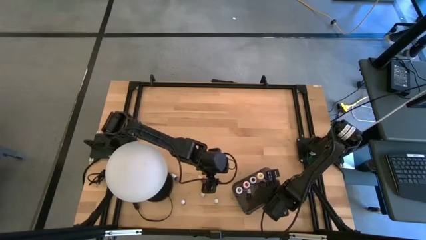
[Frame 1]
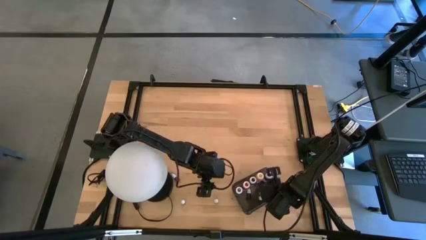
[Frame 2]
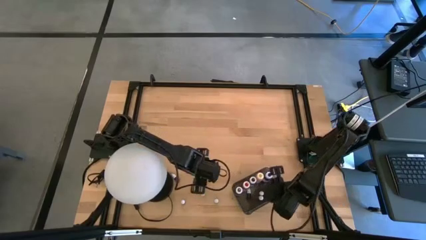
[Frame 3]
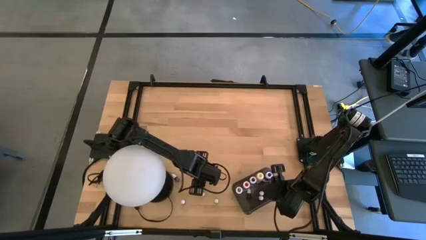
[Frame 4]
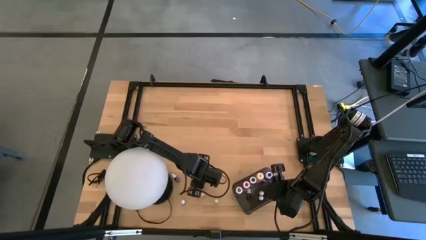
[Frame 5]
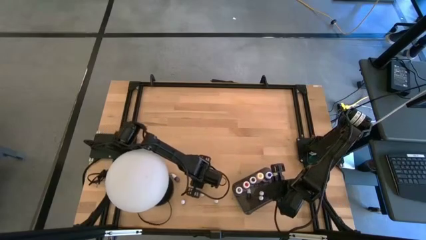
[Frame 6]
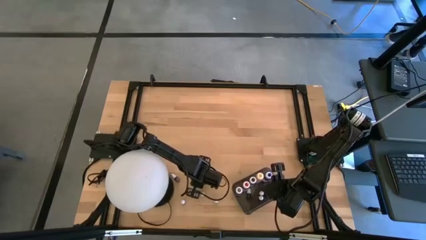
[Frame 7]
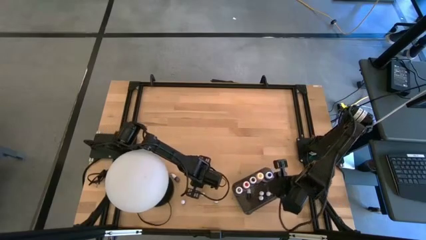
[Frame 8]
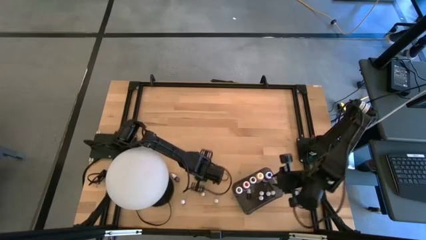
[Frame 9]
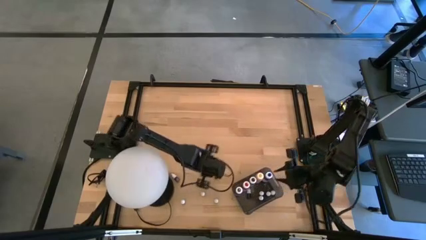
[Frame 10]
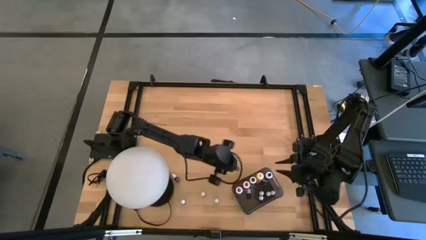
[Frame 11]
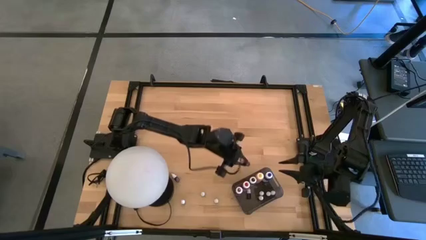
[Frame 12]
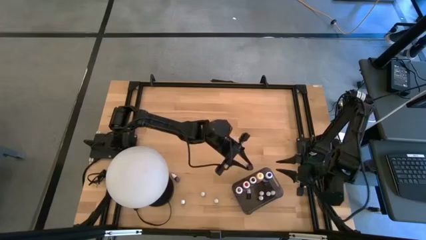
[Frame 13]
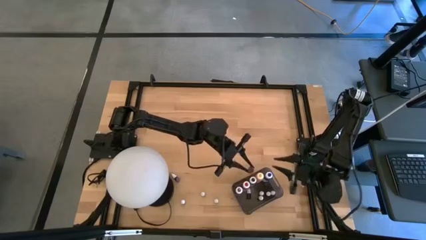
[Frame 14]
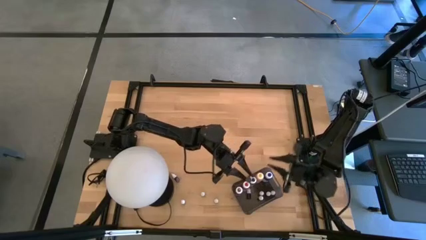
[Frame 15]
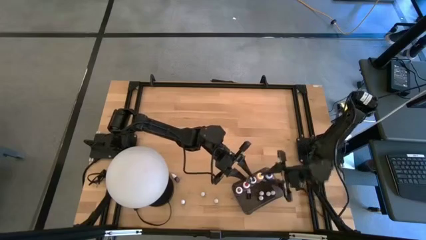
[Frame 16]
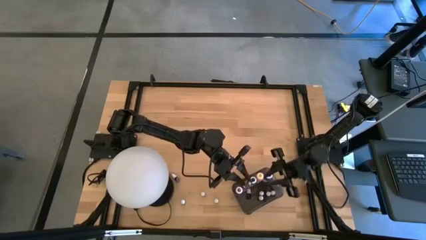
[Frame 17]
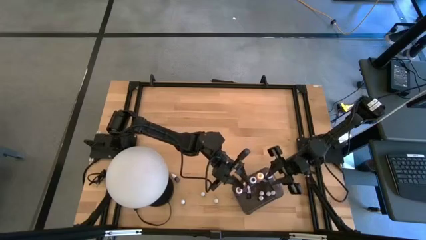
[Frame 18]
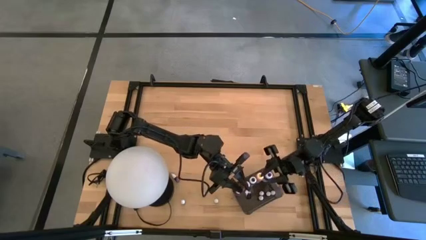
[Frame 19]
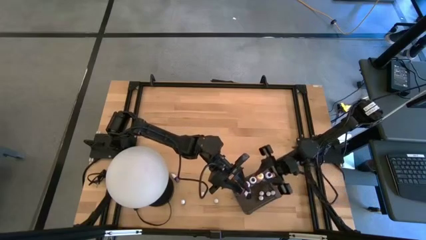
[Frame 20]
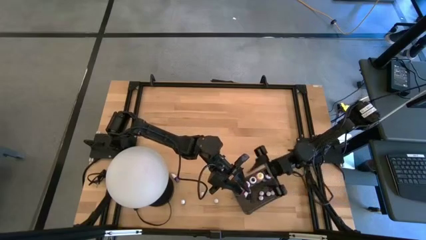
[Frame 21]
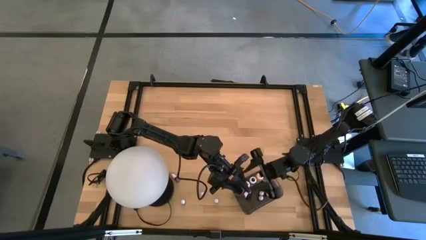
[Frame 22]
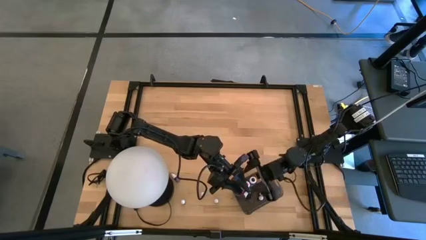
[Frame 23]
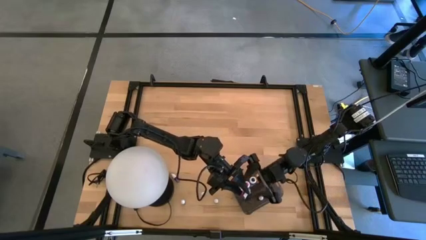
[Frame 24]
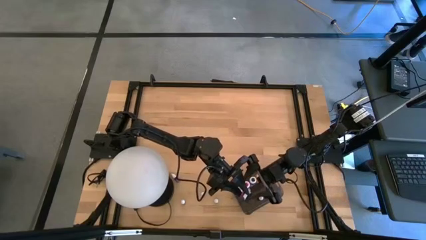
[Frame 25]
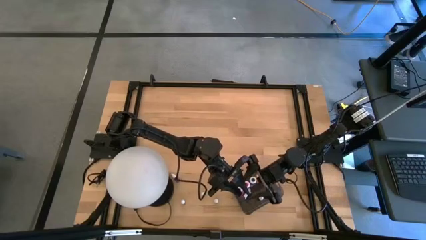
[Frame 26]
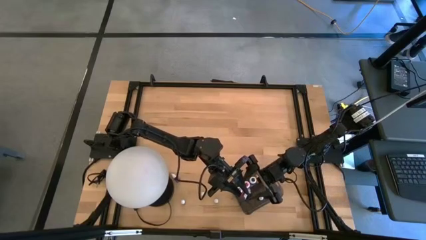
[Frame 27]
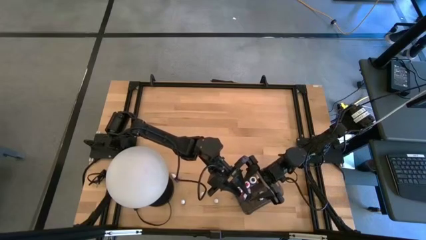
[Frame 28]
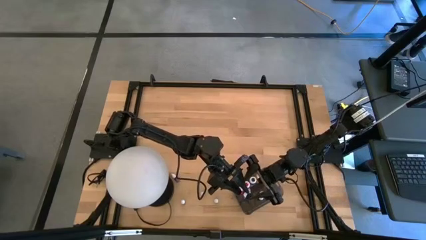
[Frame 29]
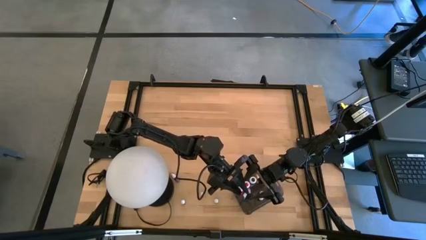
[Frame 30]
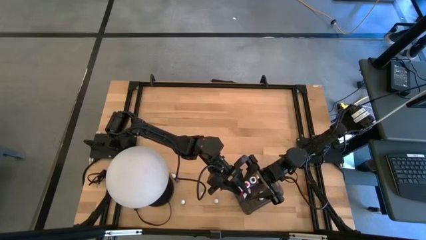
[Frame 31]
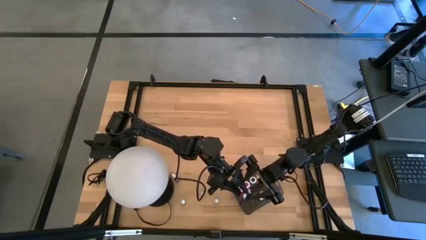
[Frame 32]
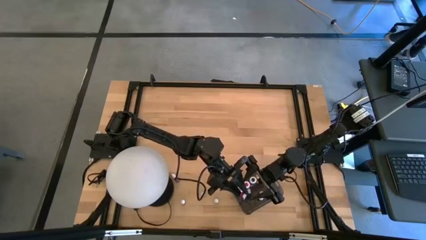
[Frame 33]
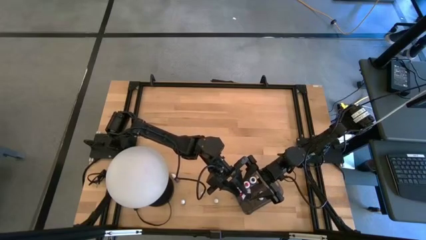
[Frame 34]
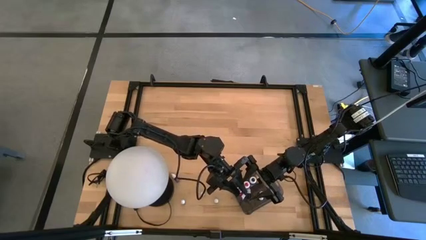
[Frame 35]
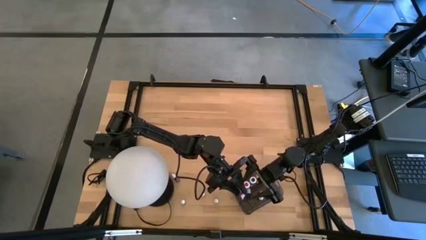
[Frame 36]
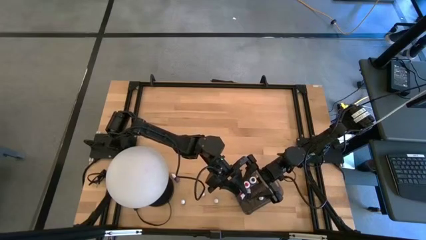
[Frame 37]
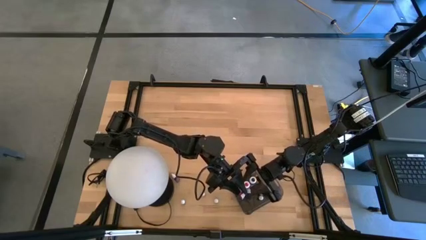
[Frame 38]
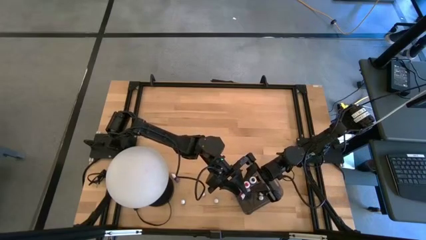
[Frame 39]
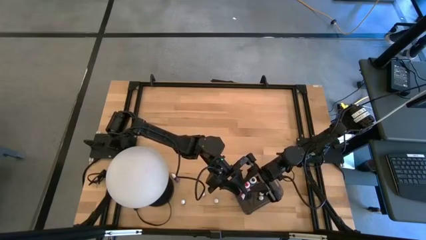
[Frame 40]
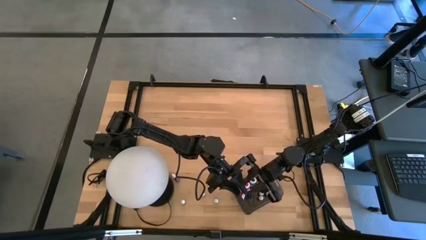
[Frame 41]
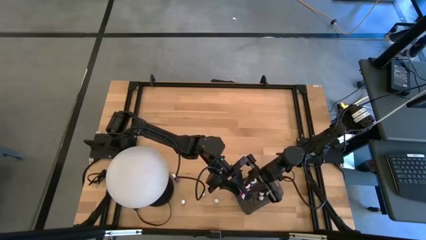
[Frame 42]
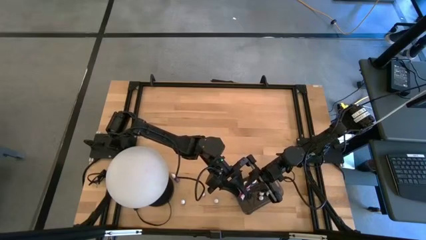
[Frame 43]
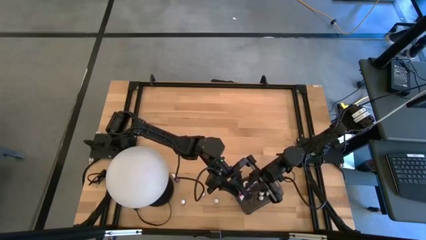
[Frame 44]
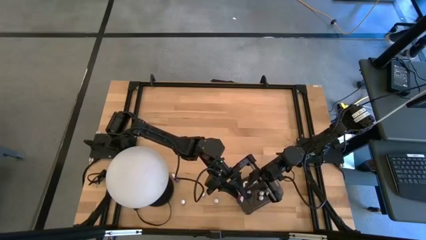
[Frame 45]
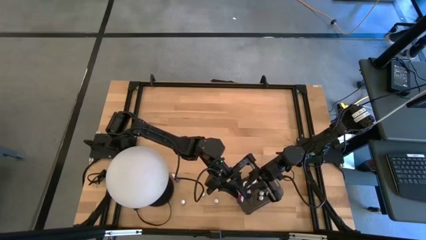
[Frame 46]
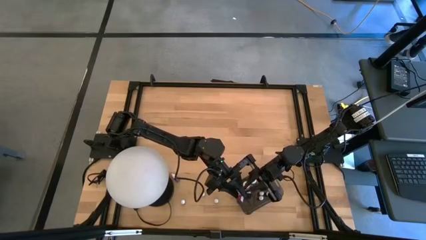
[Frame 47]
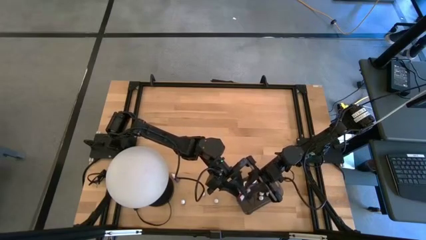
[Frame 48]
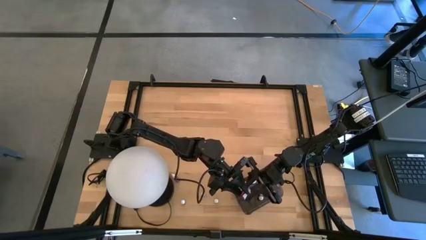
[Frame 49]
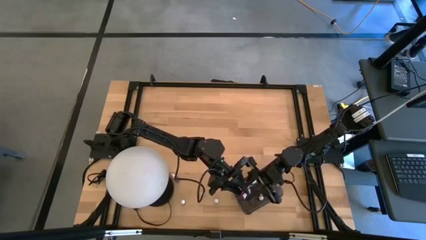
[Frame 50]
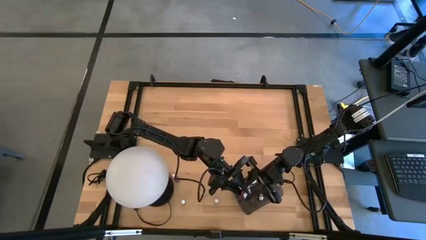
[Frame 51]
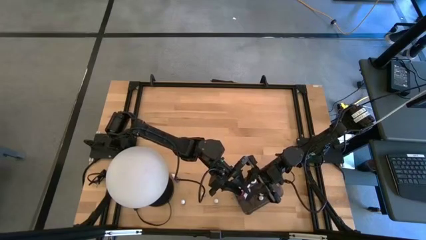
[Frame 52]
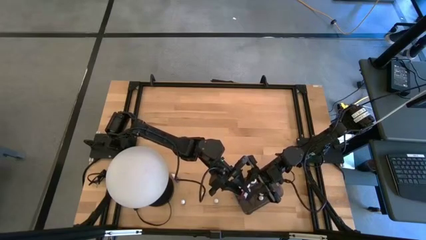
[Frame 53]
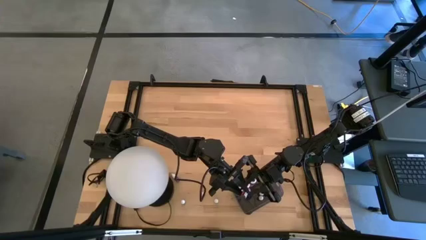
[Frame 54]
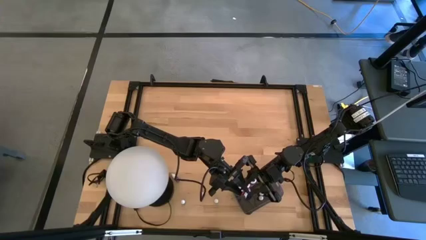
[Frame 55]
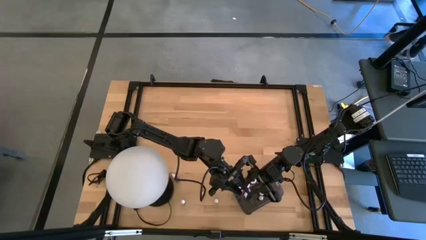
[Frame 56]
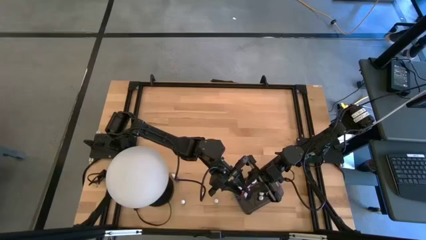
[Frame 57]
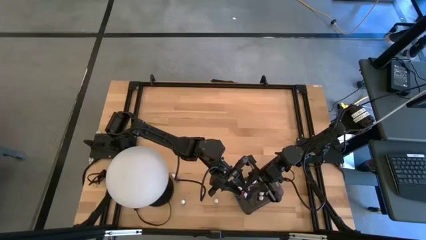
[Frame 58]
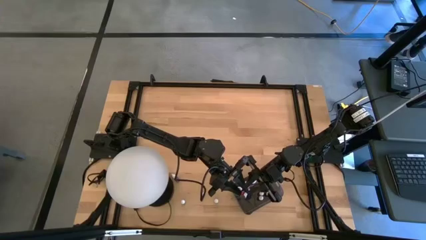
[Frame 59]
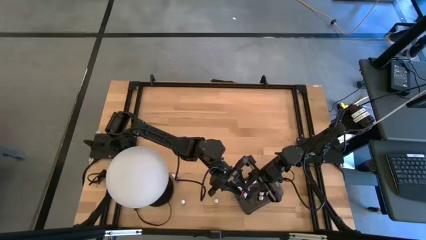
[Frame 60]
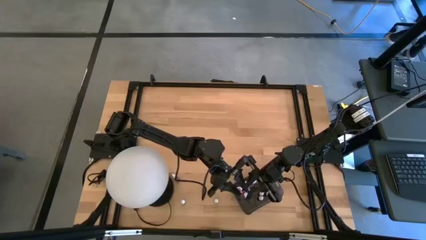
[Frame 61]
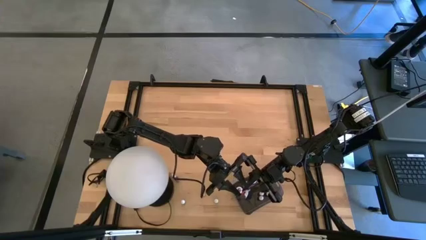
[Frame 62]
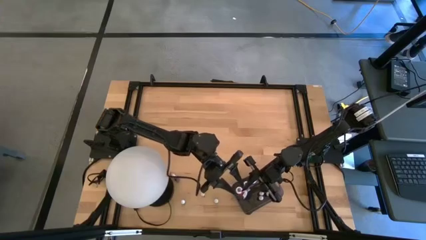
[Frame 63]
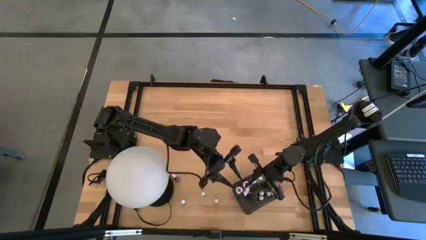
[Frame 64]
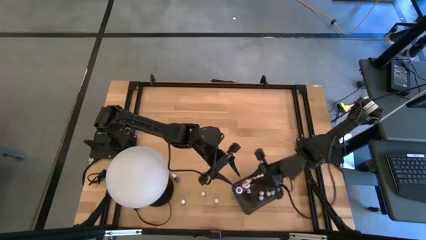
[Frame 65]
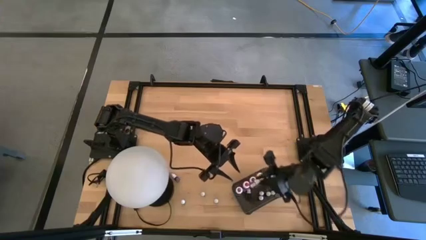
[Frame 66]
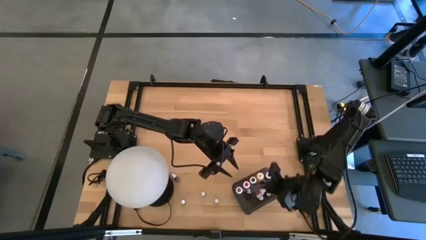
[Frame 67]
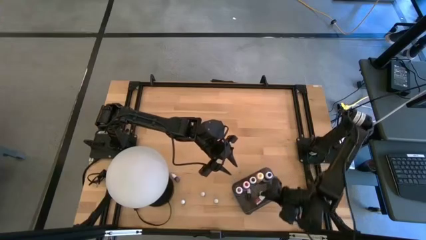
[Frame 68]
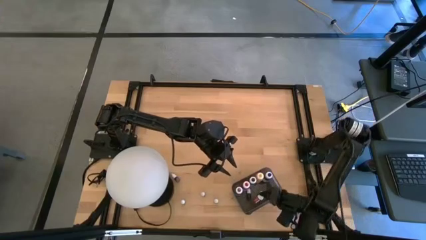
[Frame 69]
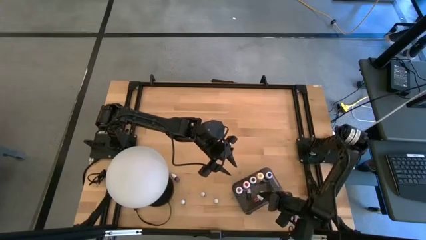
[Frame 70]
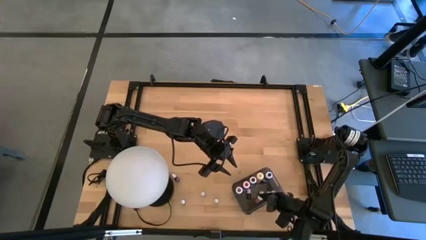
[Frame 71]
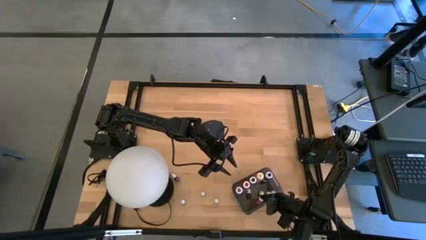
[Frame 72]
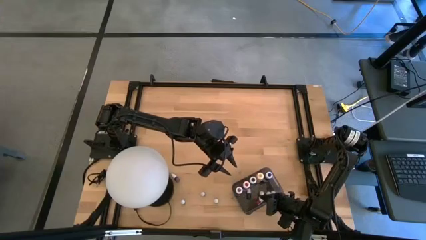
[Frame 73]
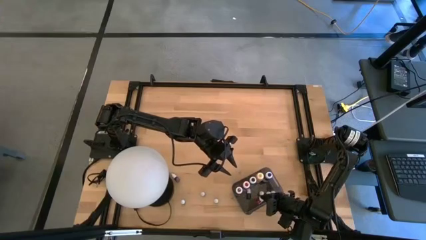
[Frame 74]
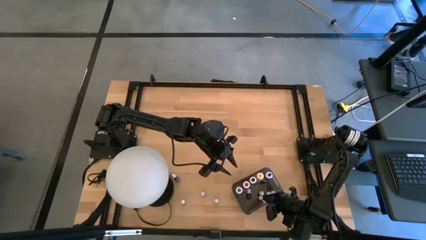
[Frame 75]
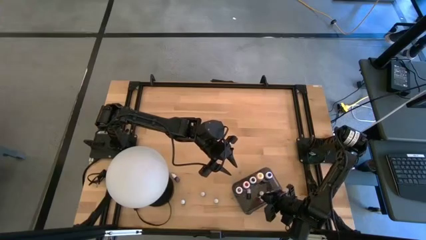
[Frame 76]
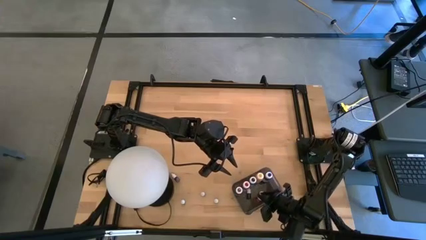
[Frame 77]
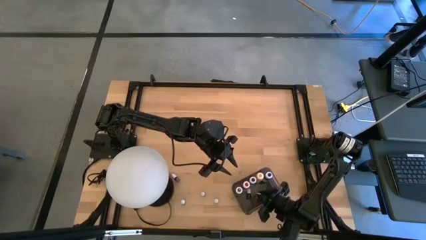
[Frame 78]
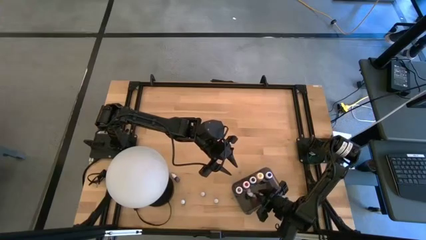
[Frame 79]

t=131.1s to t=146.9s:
Task: Pick & Place food coloring
Put the top small red food coloring bottle into the bin
